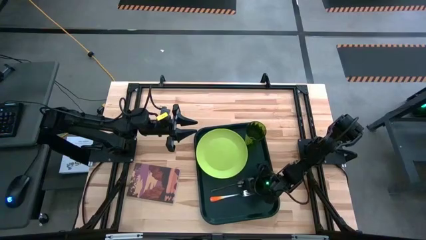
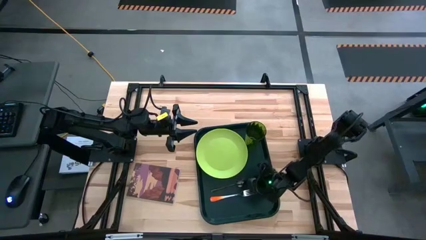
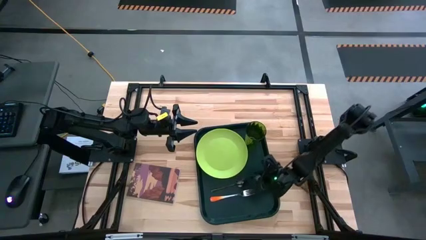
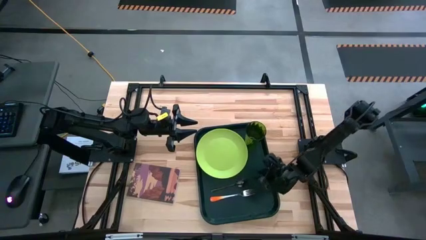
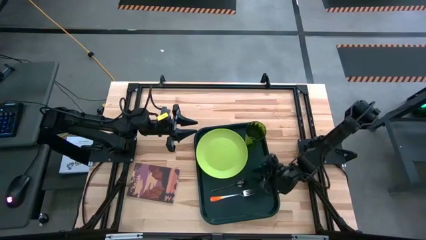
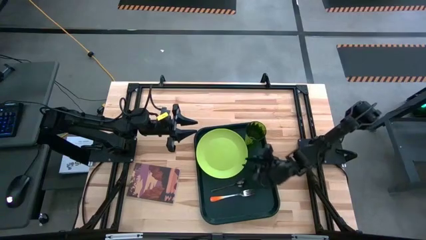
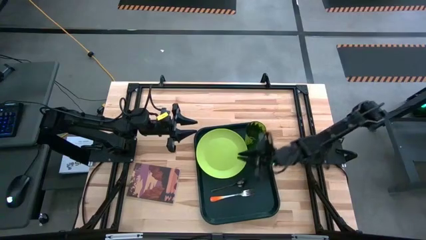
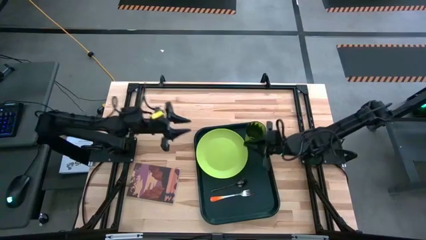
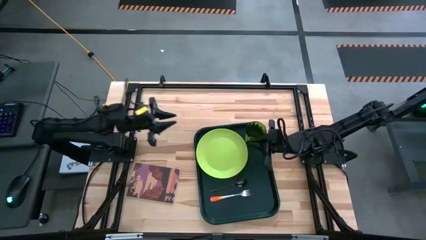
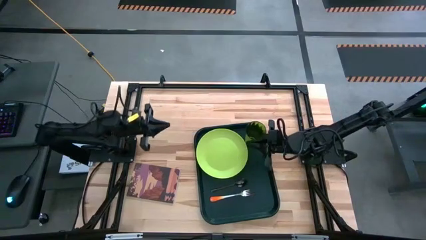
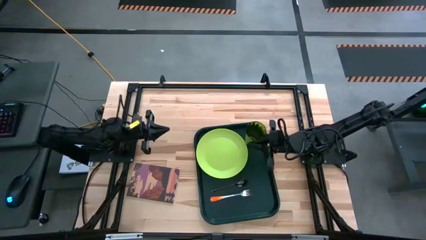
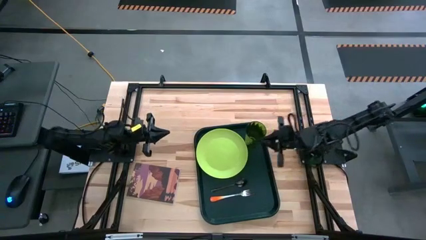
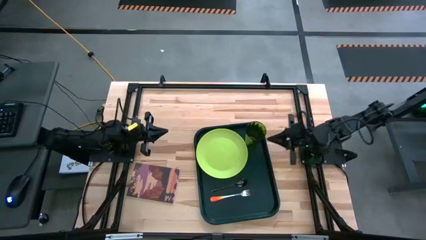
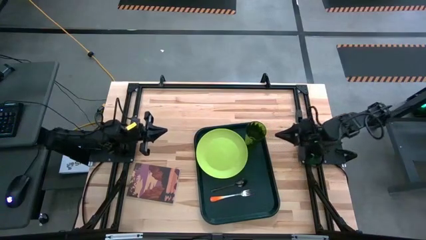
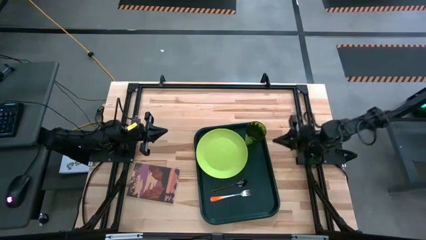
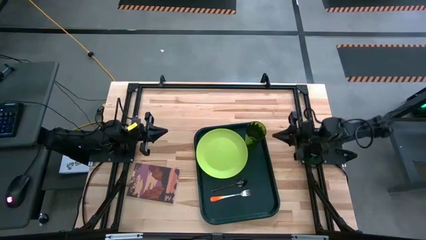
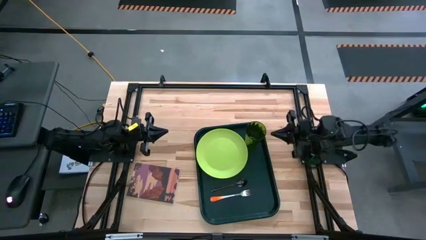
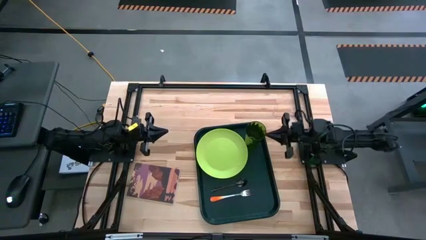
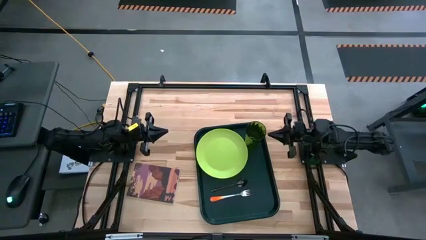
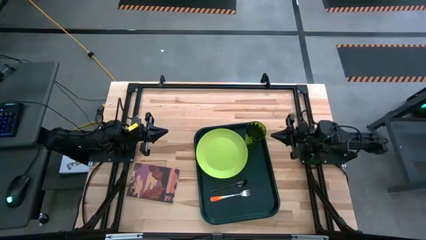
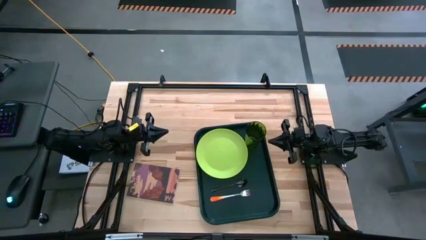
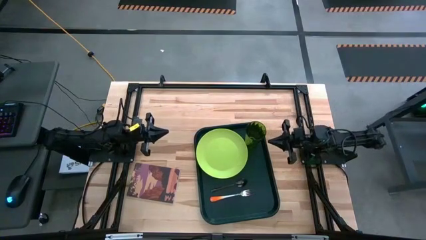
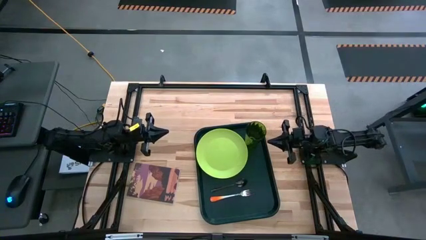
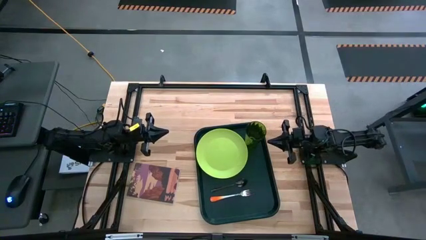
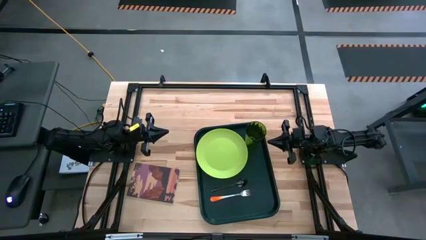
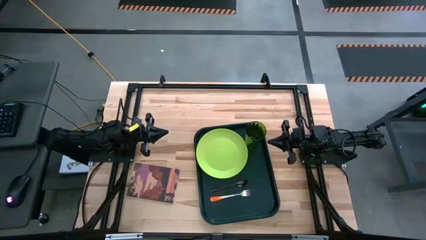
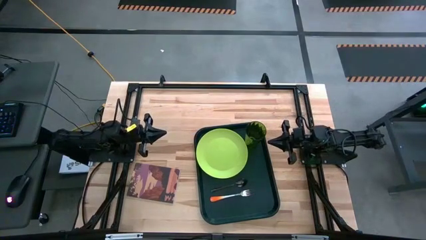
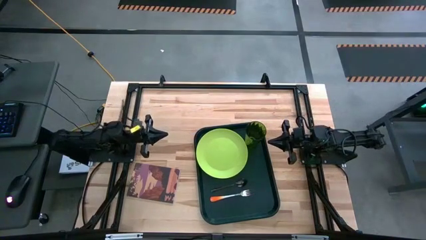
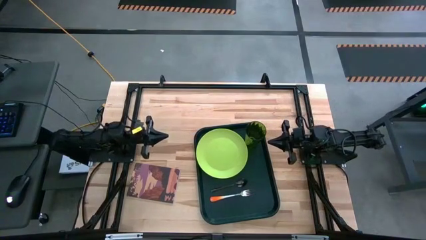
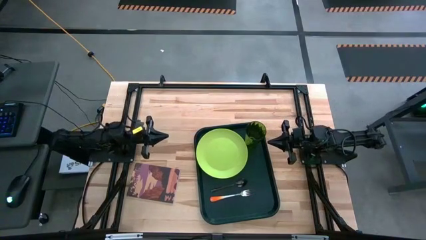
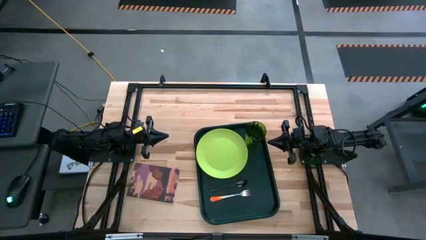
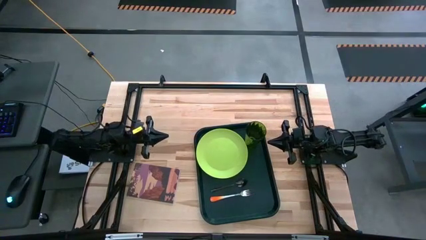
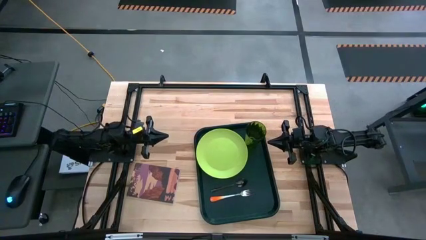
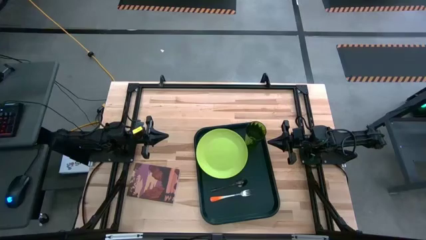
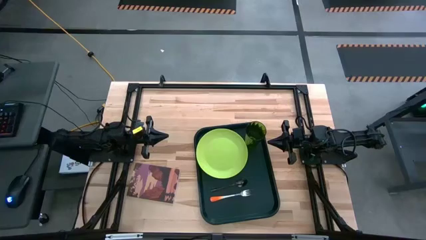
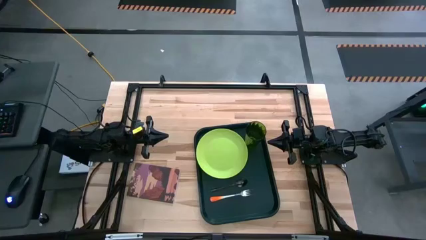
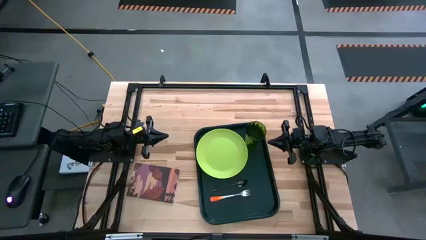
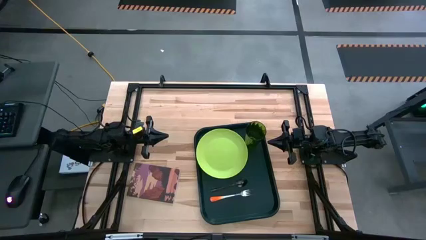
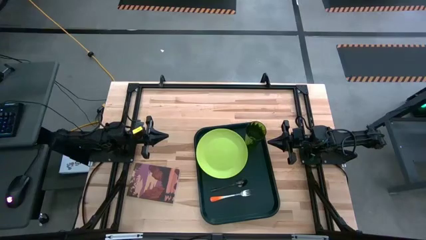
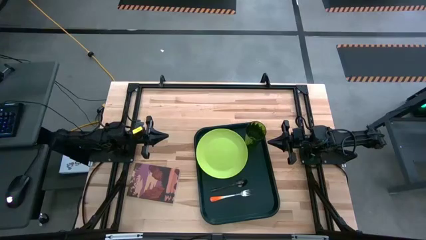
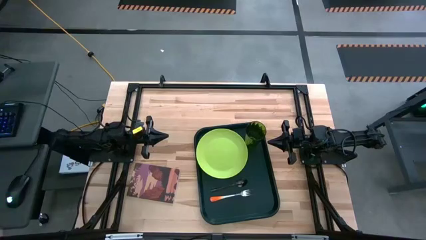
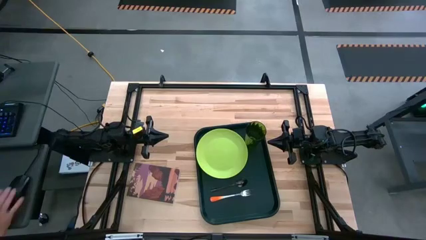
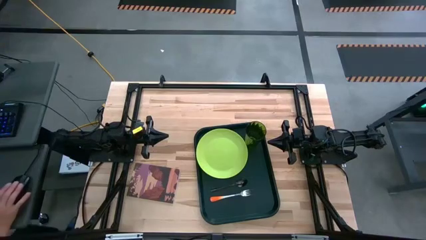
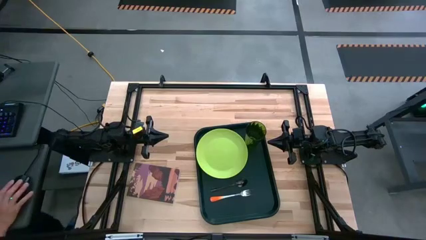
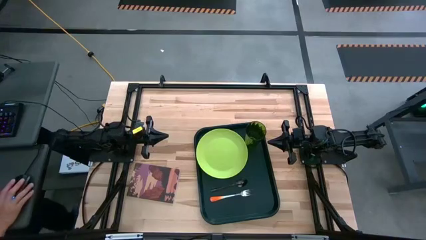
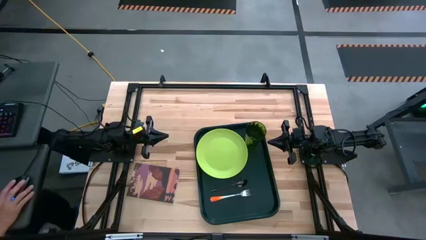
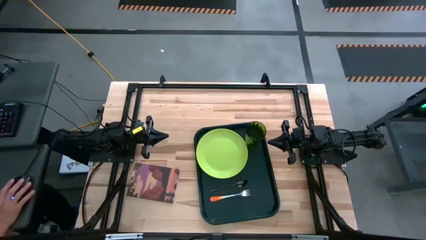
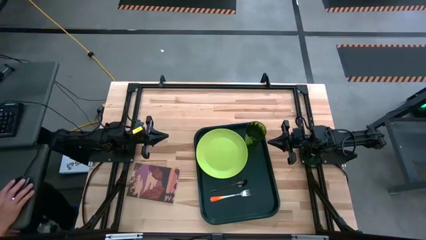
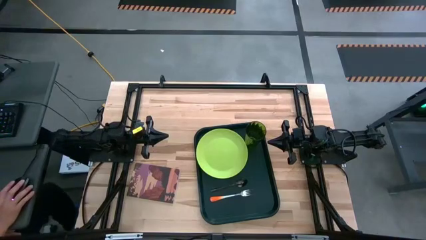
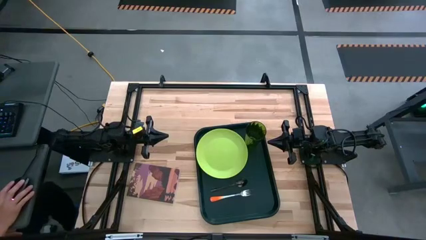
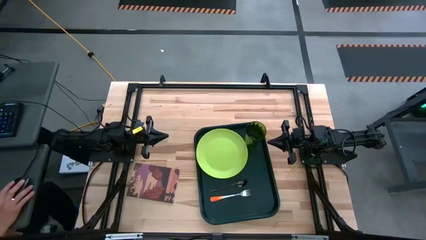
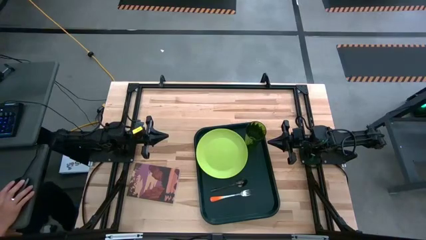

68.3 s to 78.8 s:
Task: Pick and place plate/cup/fork/spoon on tray
Return to Home Position
